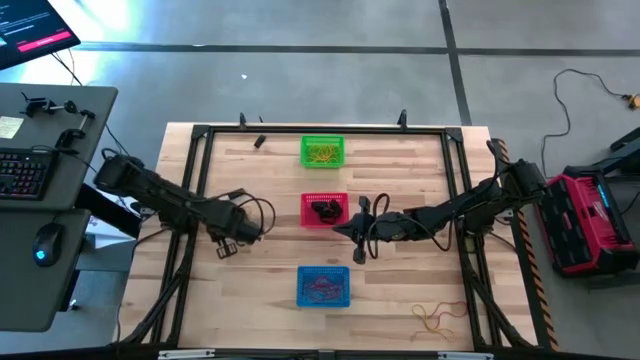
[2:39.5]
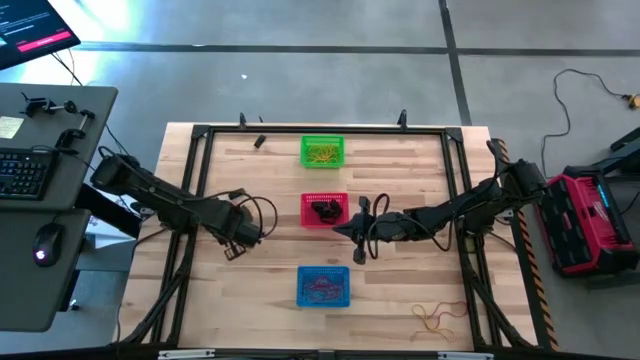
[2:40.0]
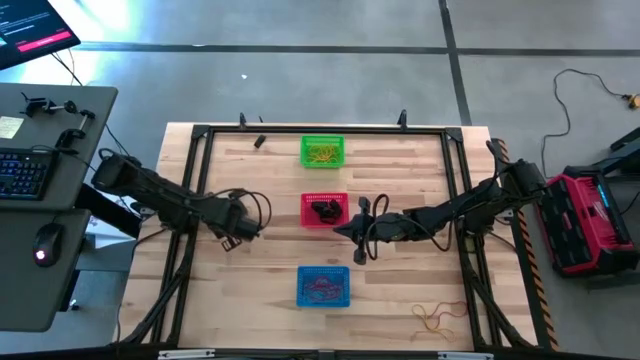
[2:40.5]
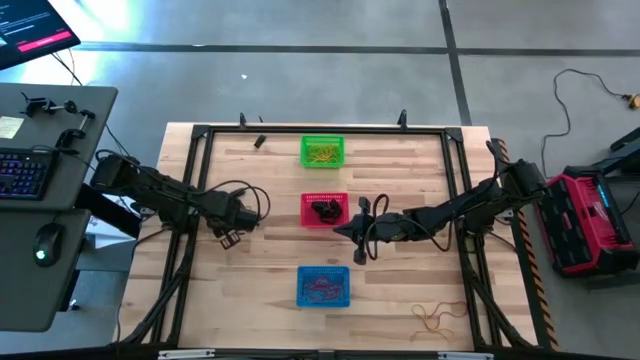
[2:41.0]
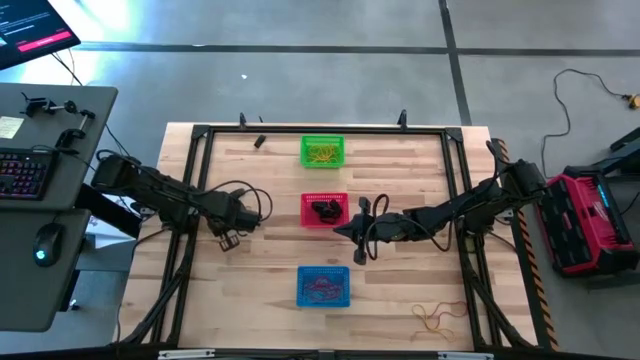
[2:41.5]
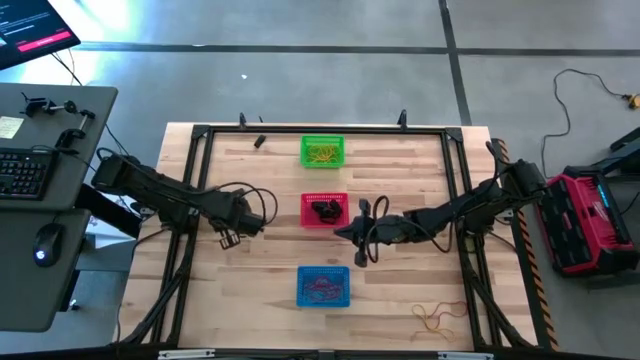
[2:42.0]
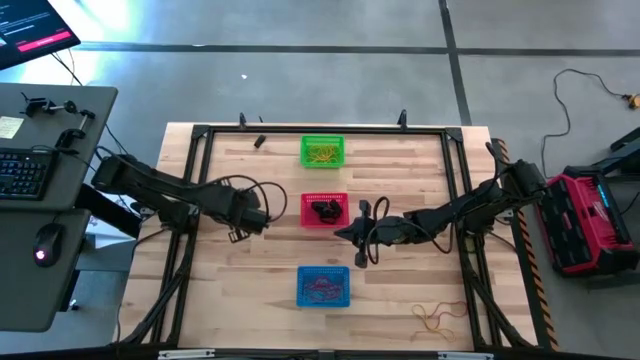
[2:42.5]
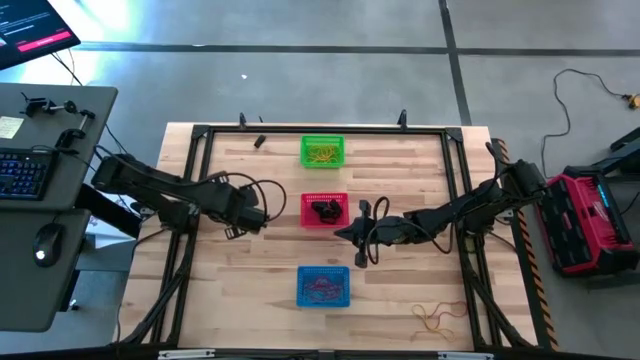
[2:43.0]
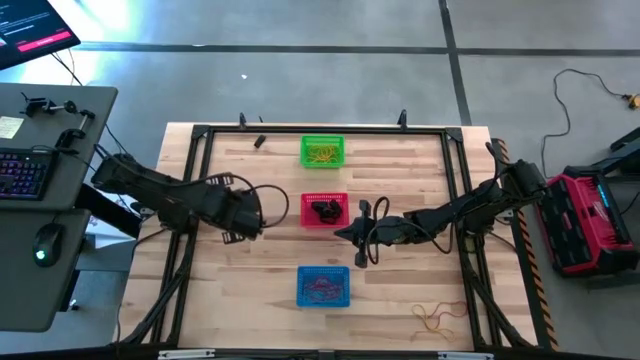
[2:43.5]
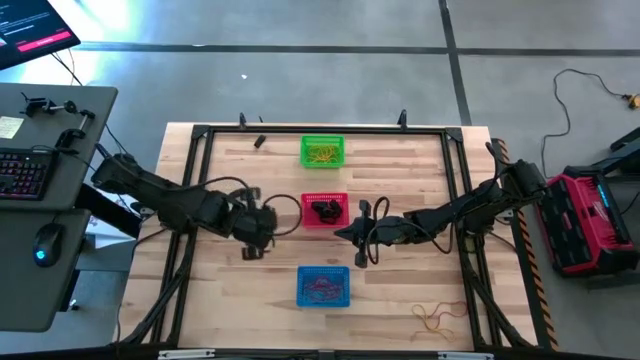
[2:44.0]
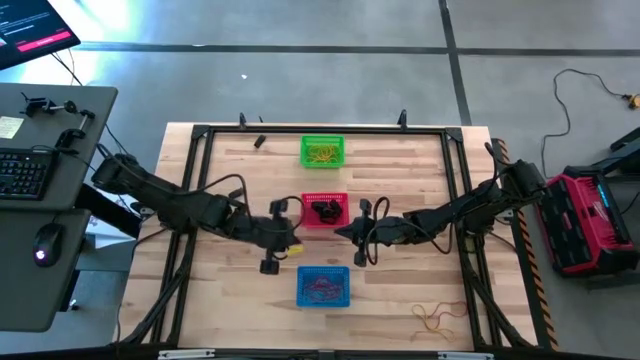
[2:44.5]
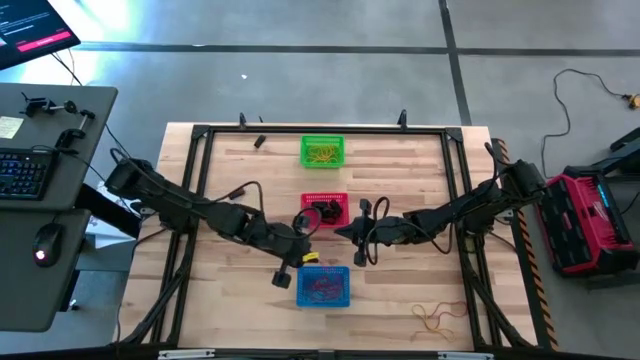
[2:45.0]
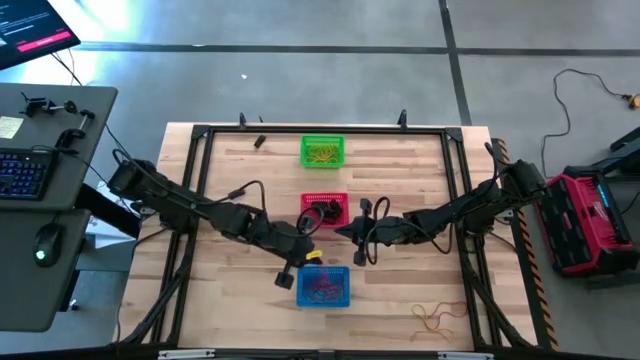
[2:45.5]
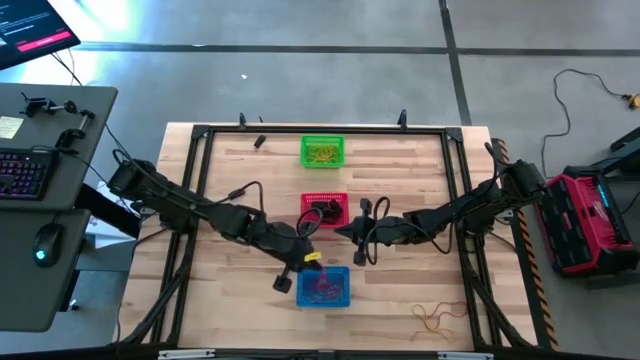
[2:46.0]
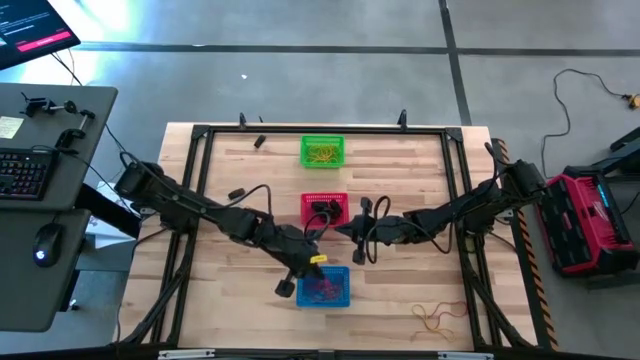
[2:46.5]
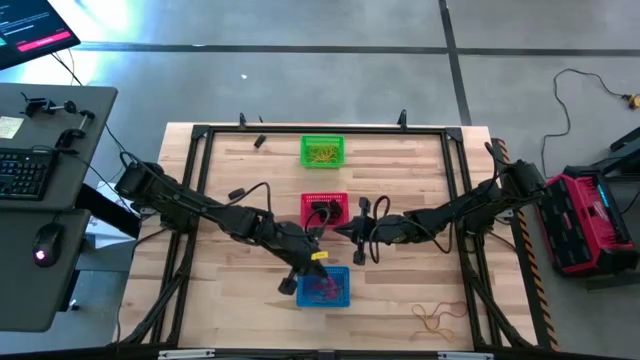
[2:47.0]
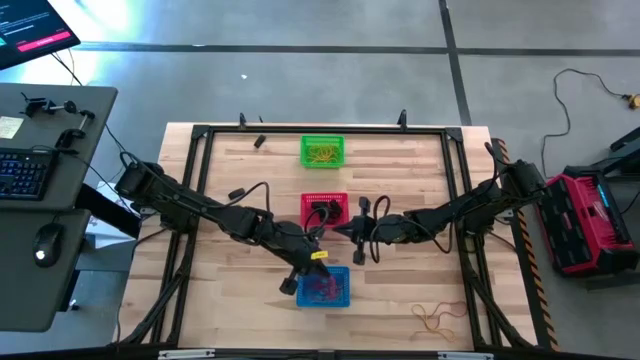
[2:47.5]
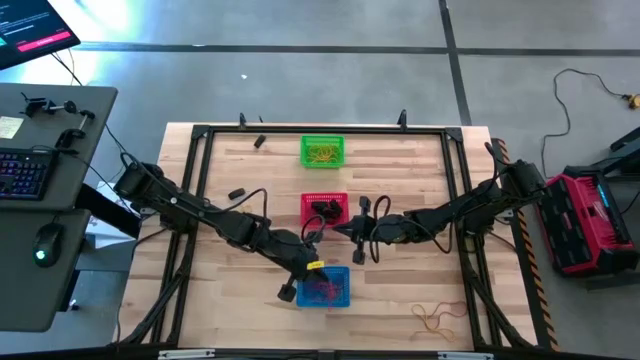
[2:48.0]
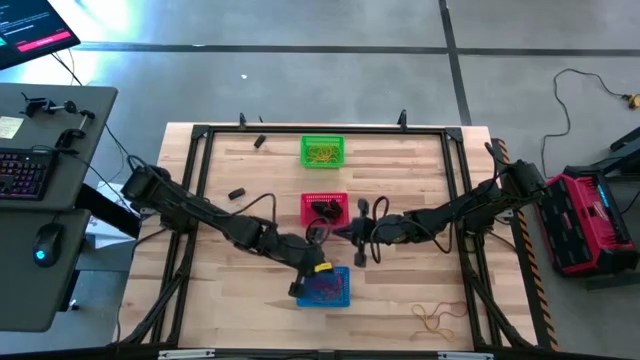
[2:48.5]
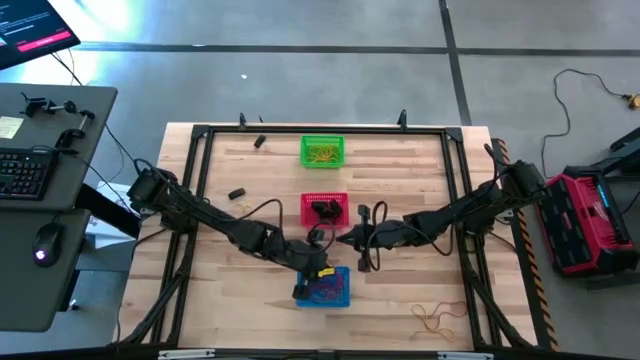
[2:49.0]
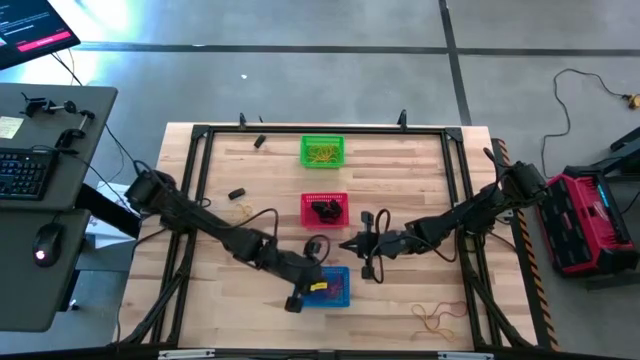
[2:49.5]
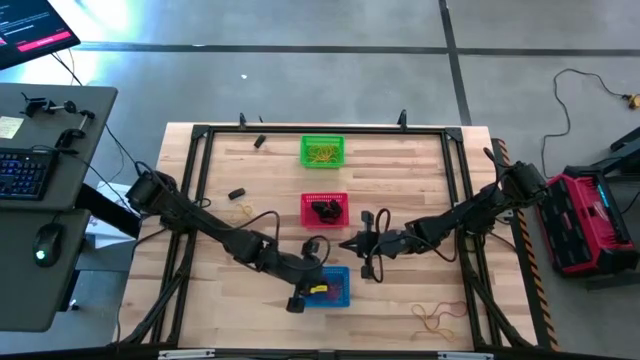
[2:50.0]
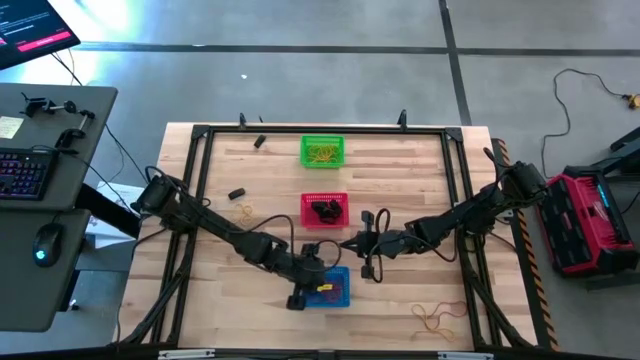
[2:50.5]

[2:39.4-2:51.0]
Task: Sort rubber bands into baskets
Put the red rubber band into the blue bin

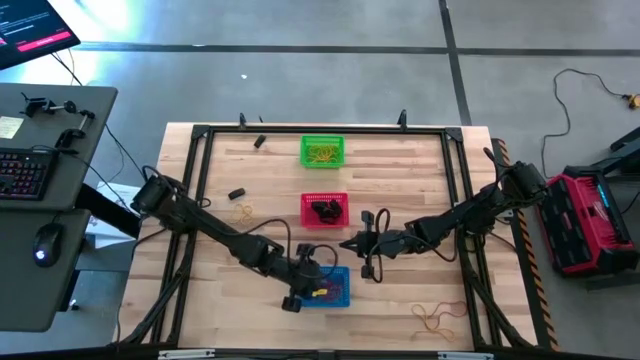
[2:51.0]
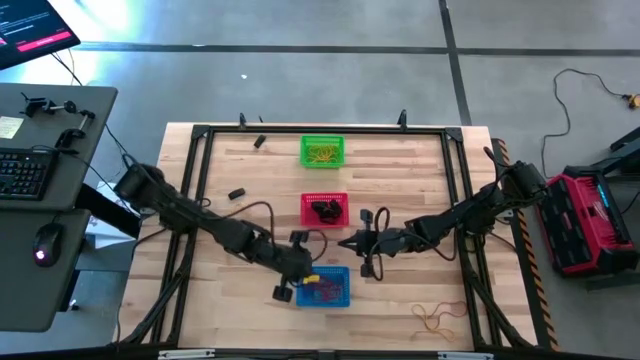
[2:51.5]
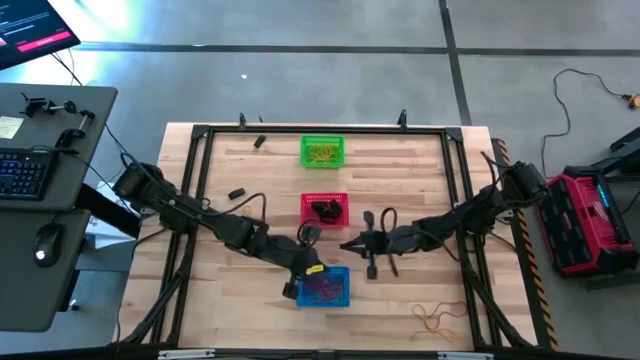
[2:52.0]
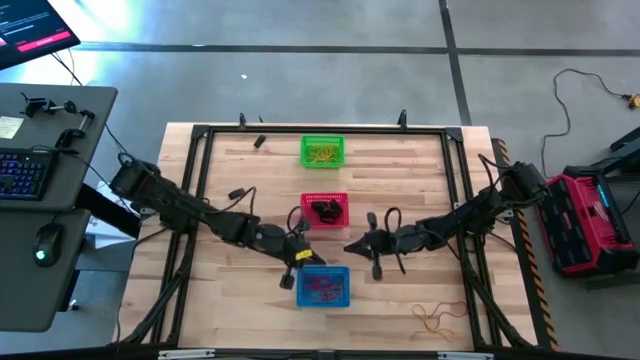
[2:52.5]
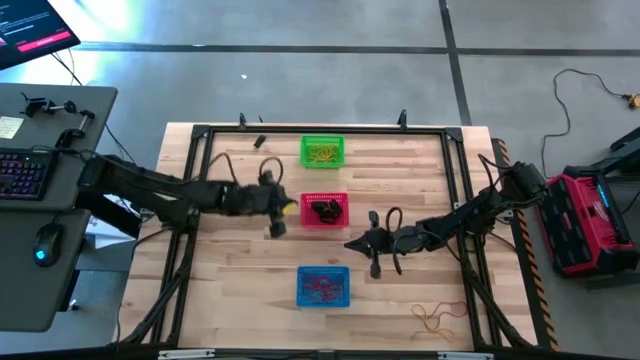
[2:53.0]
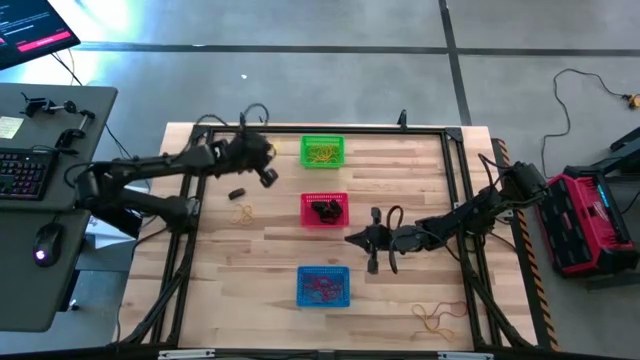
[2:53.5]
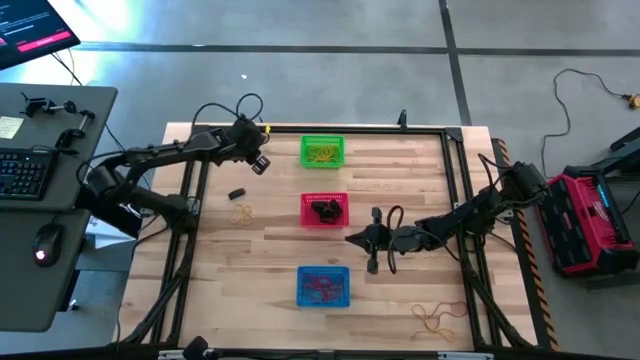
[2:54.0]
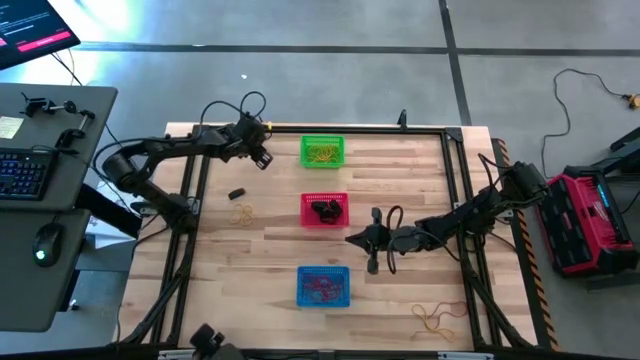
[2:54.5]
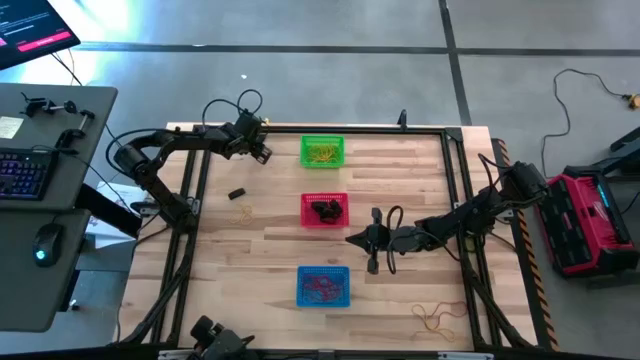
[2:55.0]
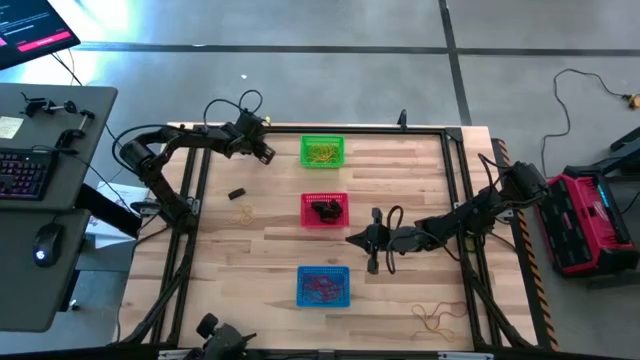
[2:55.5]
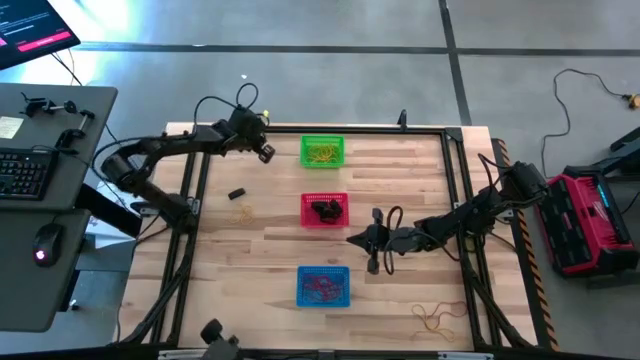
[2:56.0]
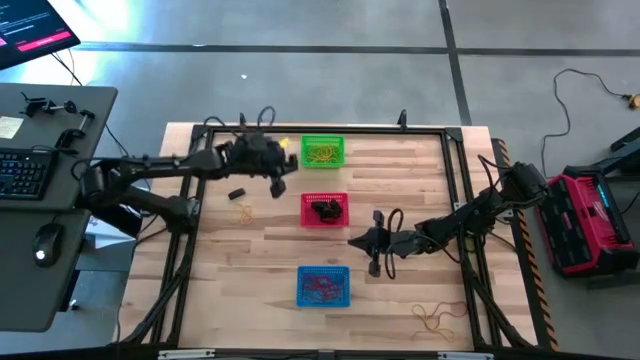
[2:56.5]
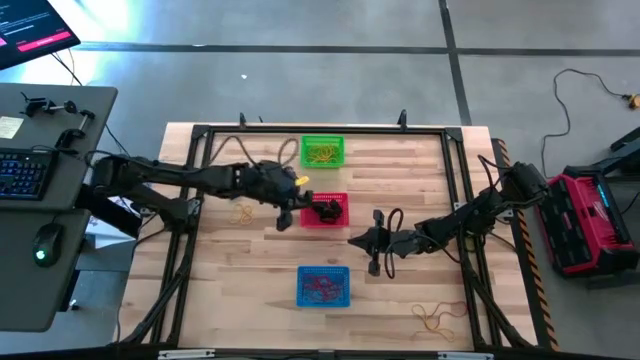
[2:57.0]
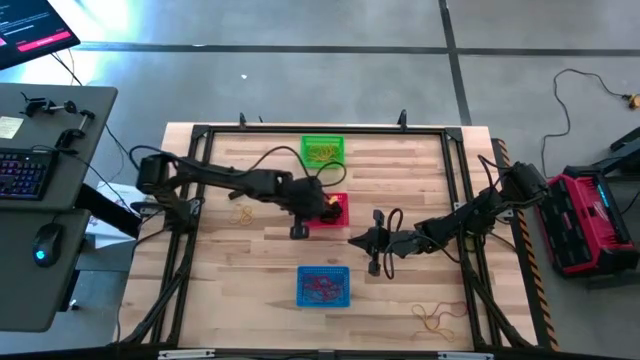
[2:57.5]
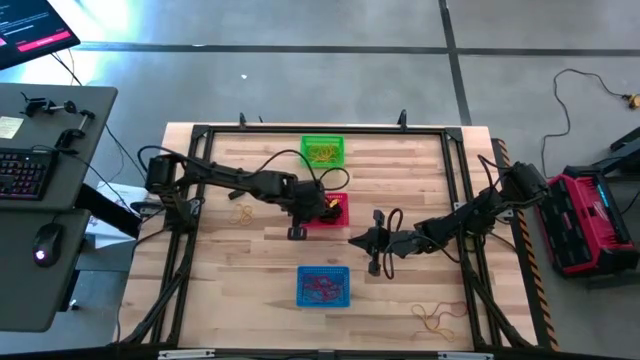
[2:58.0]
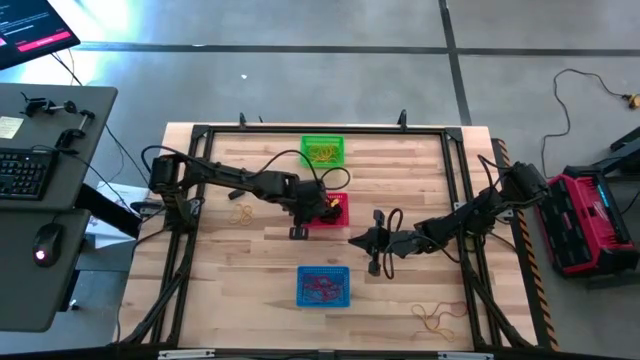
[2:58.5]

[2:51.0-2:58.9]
Put the black rubber band into the red bin

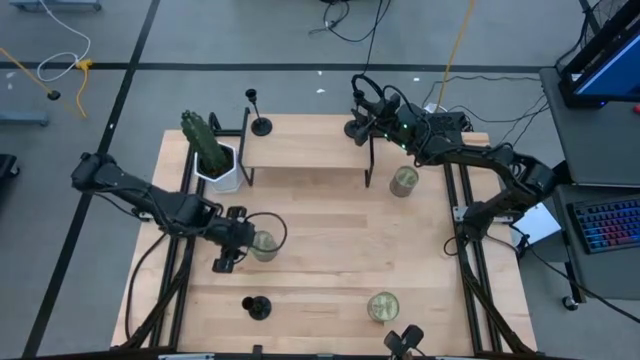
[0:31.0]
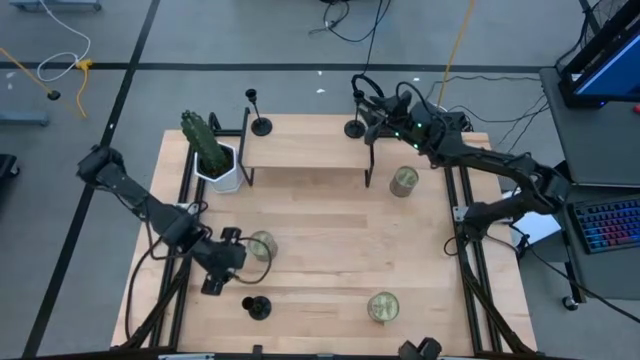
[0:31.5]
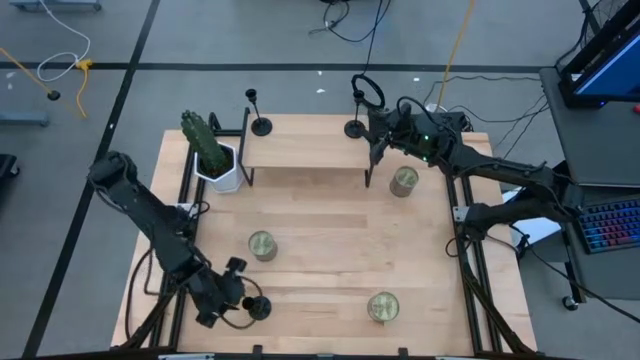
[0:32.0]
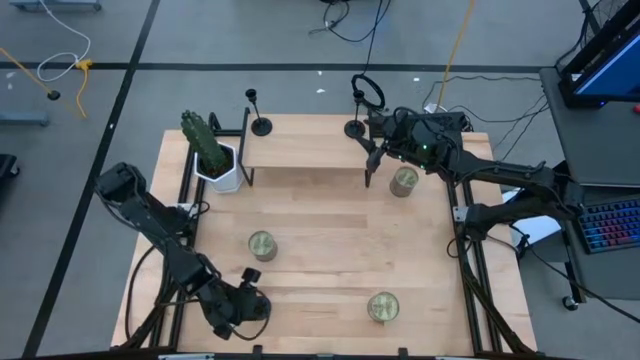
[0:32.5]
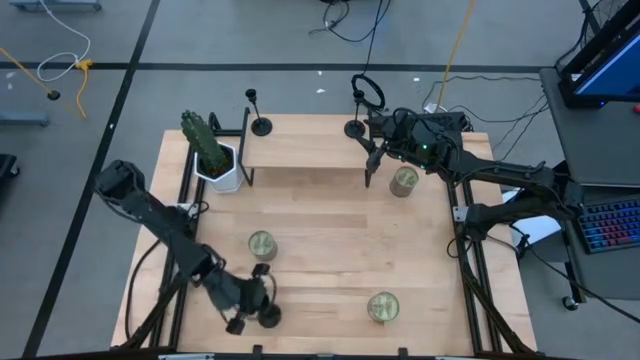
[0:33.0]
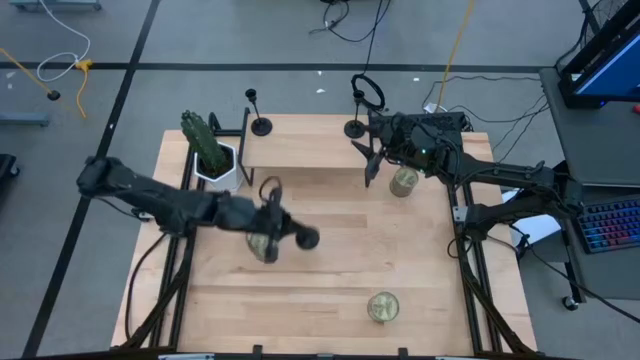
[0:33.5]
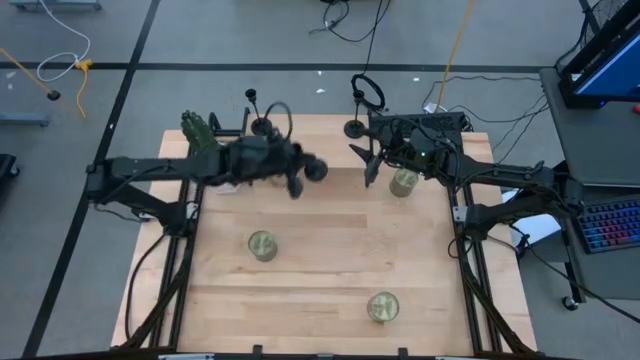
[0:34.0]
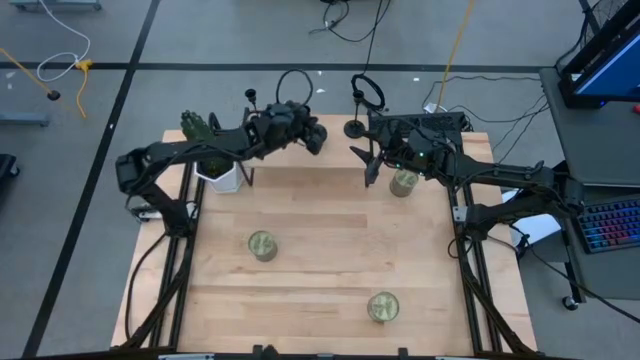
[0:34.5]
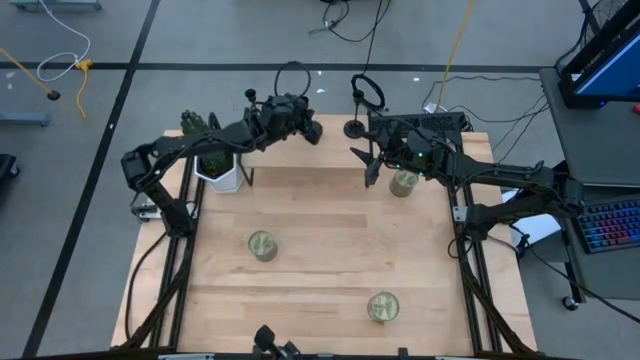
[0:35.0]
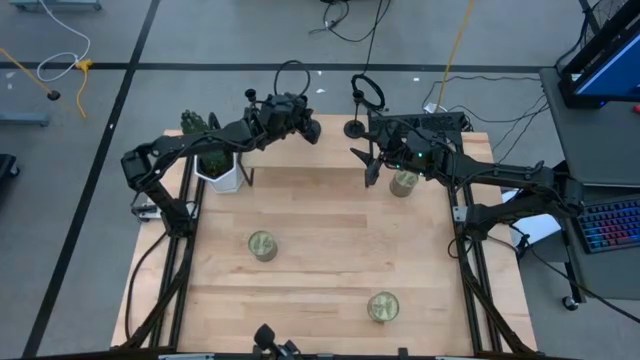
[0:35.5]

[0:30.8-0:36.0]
Task: Pick & Place candle stick holders
Put the black candle holder on the shelf aligned with the other black candle holders
